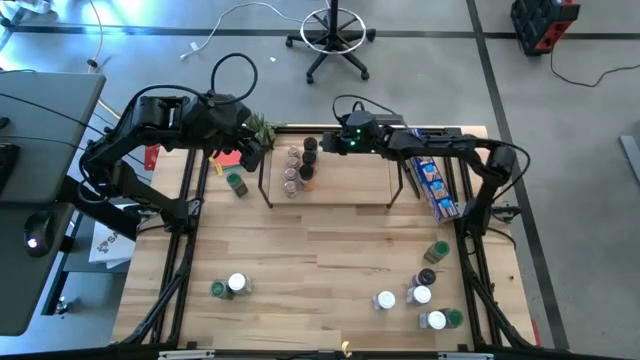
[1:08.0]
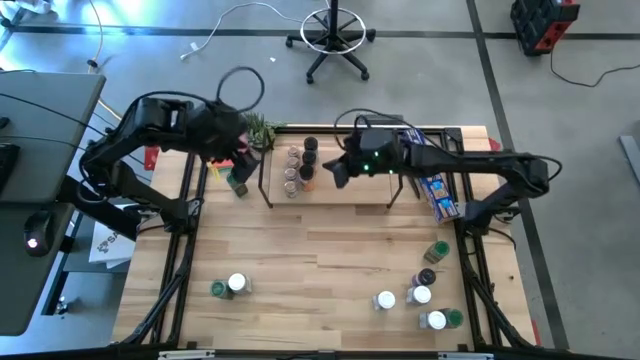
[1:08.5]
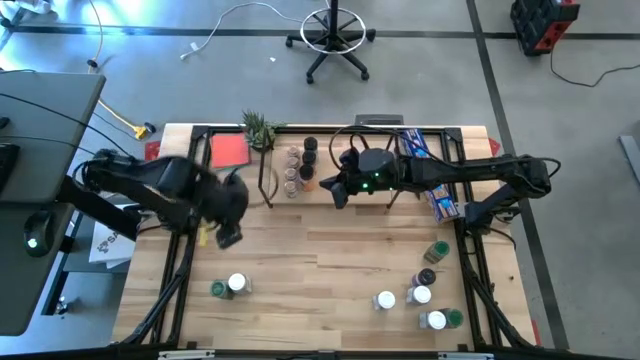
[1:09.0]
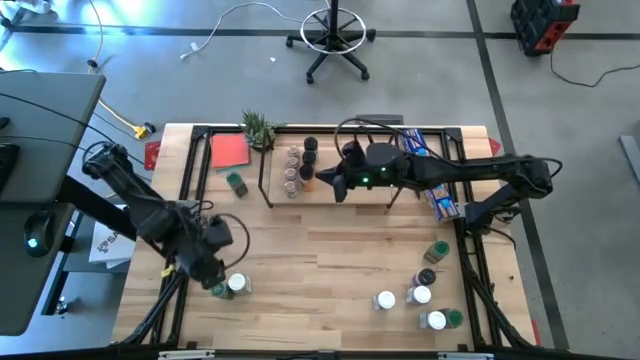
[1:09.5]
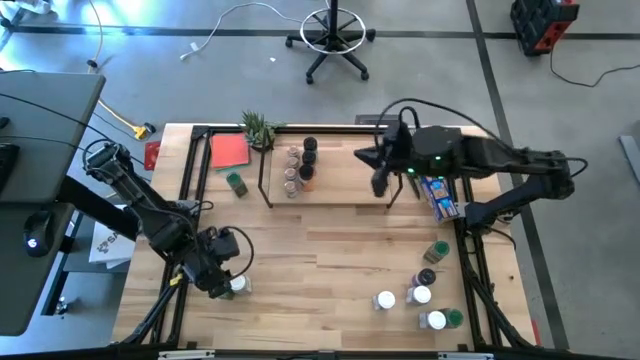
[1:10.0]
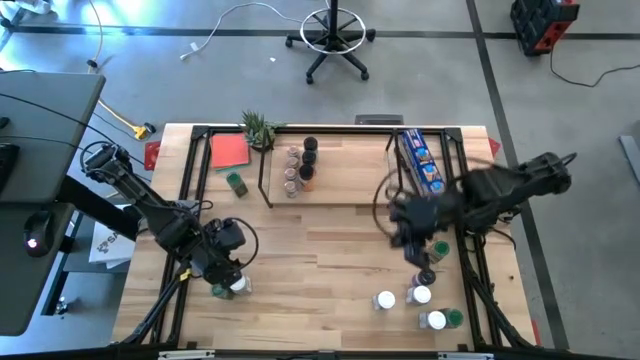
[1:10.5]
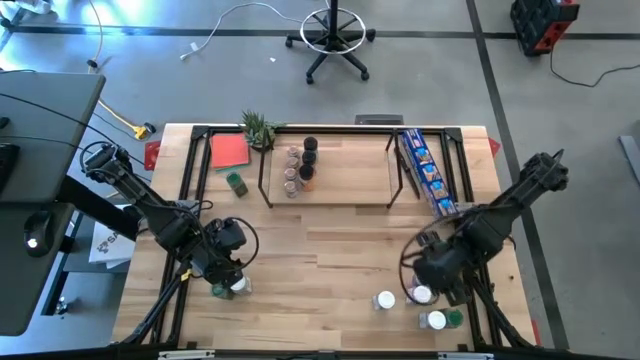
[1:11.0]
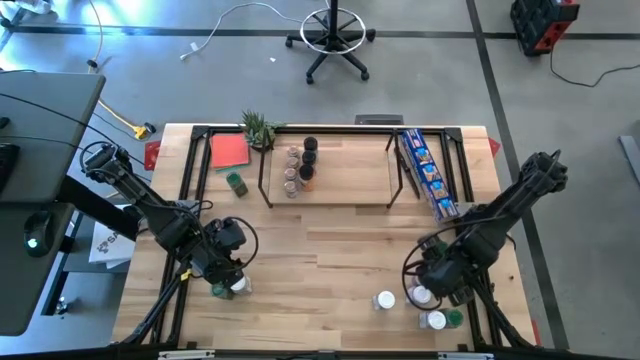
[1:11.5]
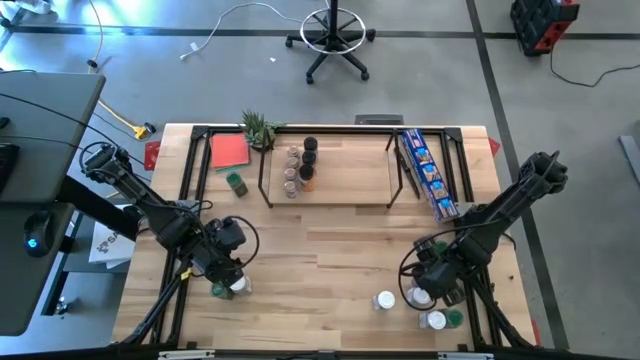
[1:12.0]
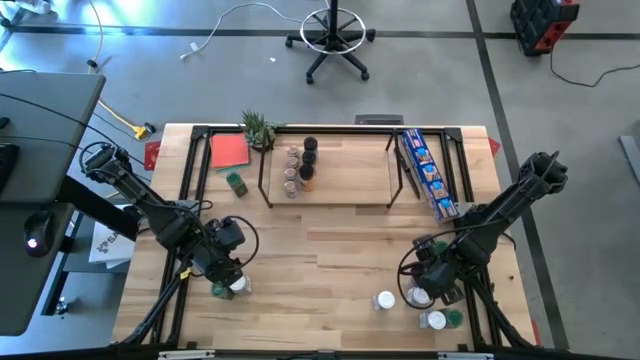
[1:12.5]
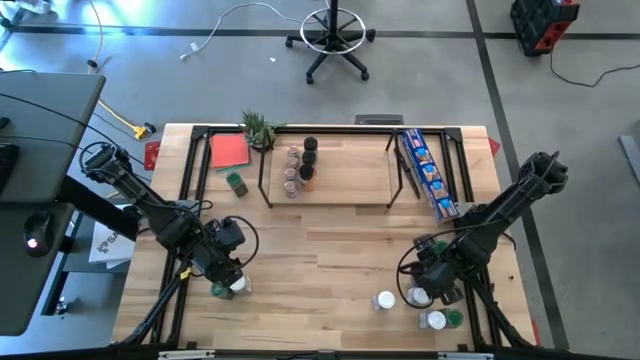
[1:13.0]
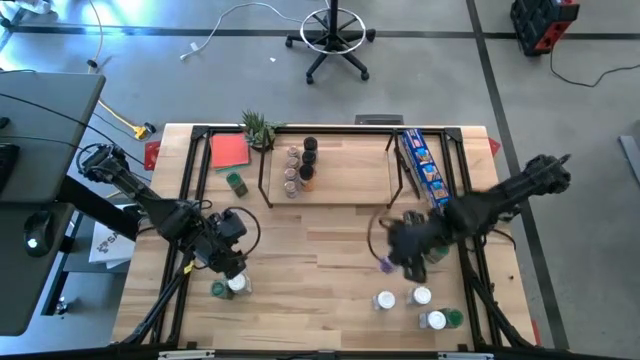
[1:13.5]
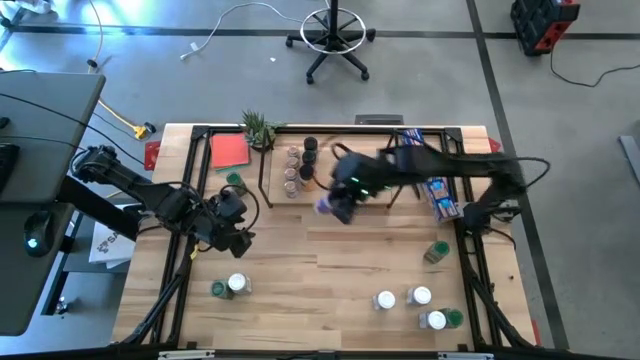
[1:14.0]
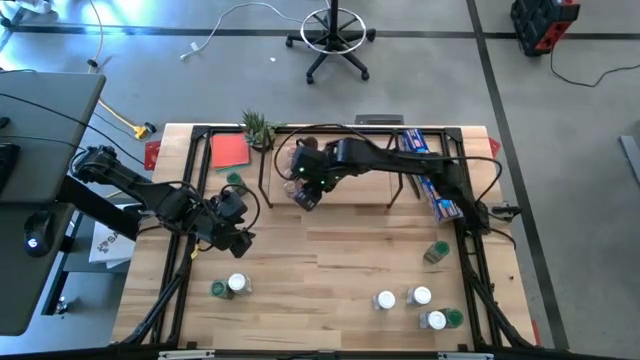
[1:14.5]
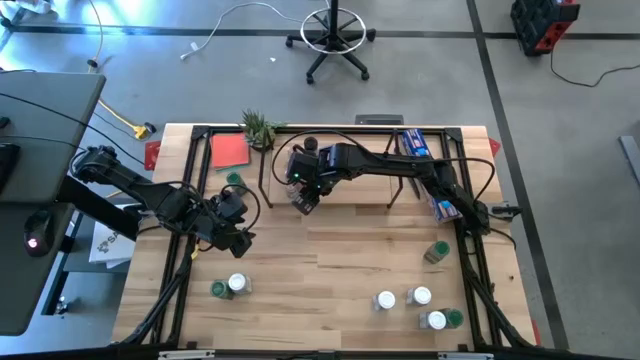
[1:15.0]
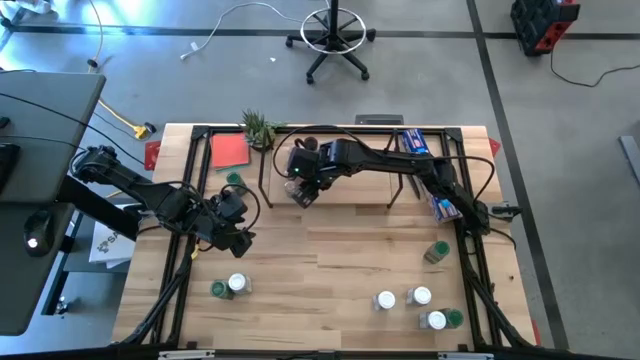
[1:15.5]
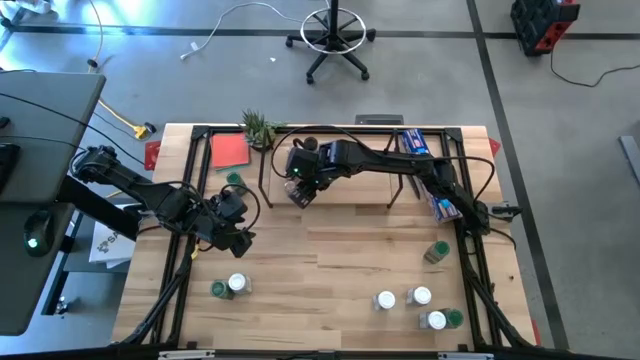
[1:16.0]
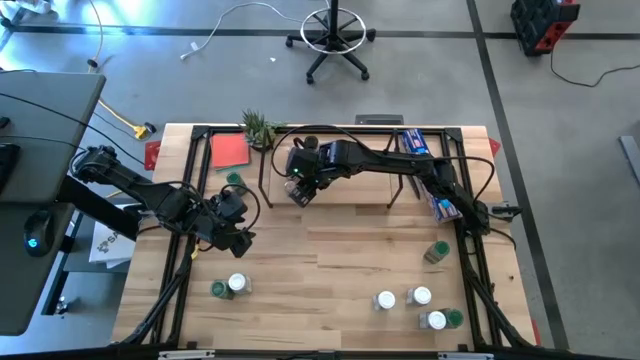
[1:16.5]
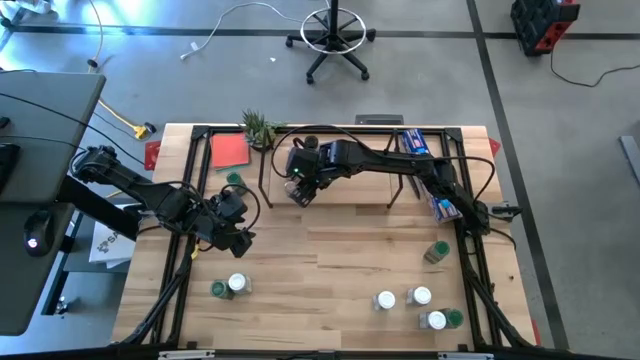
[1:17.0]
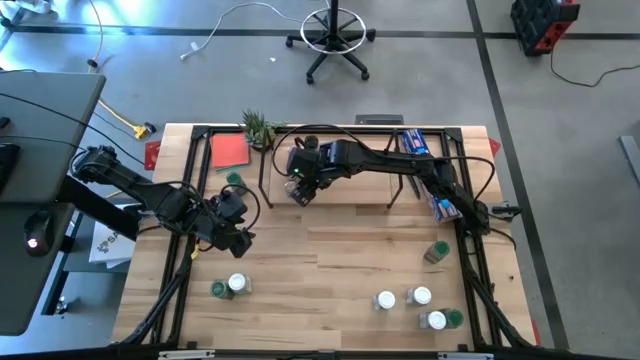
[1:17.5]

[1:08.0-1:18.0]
Task: Shelf spices
Put the black seasoning bottle aligned with the other black seasoning bottles on the shelf

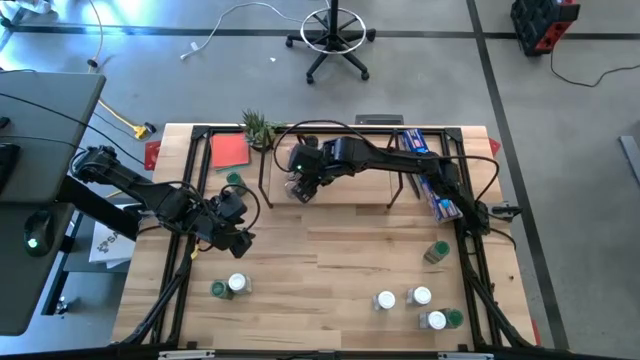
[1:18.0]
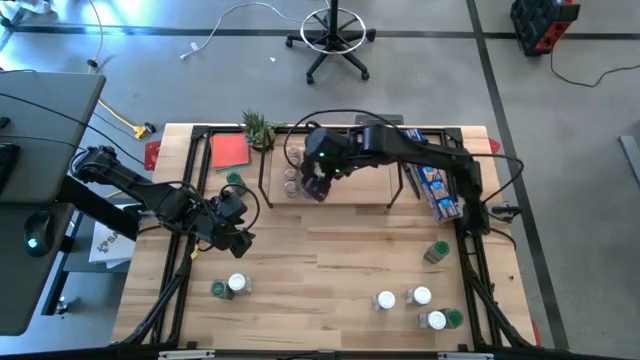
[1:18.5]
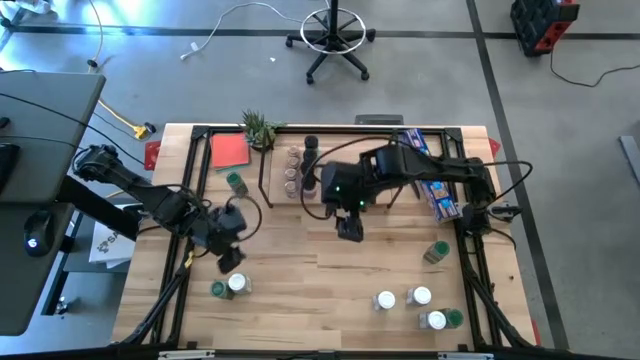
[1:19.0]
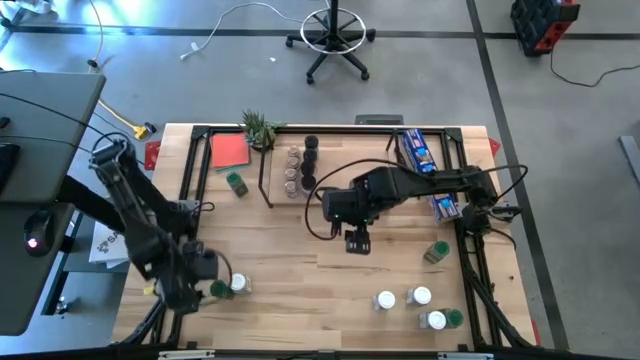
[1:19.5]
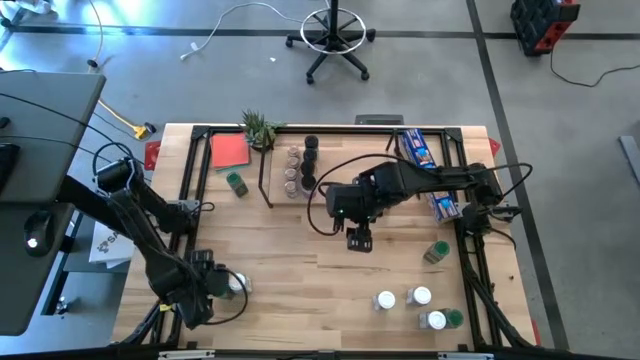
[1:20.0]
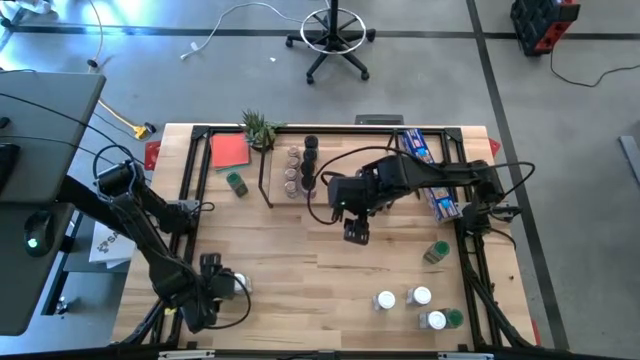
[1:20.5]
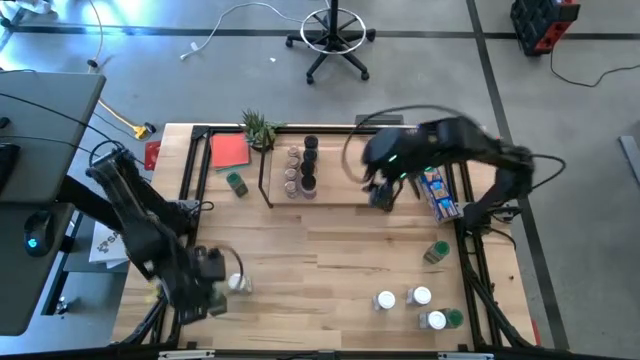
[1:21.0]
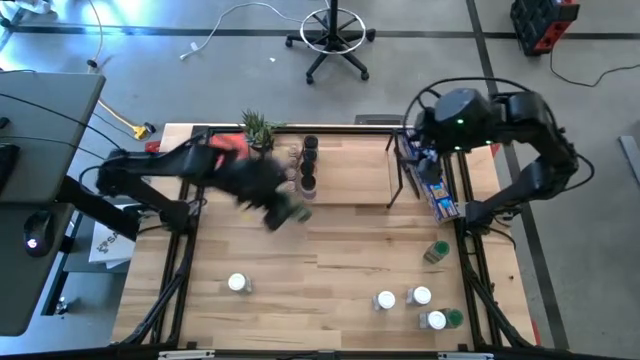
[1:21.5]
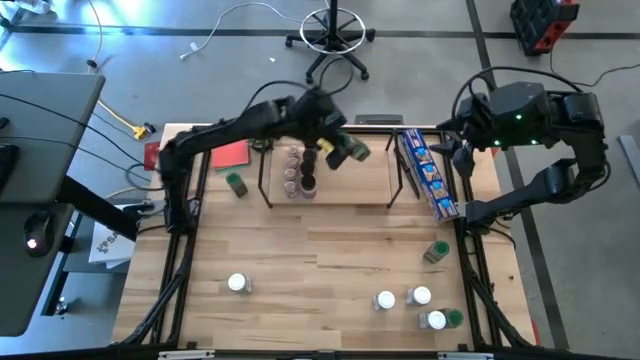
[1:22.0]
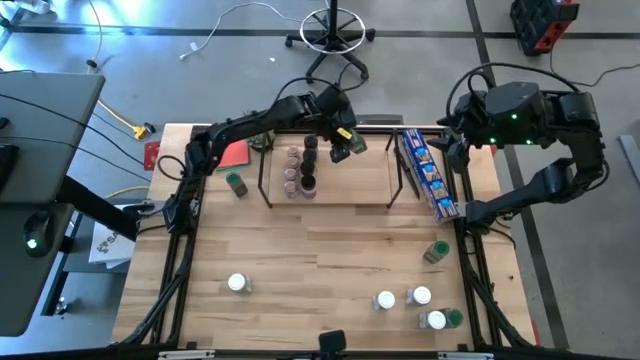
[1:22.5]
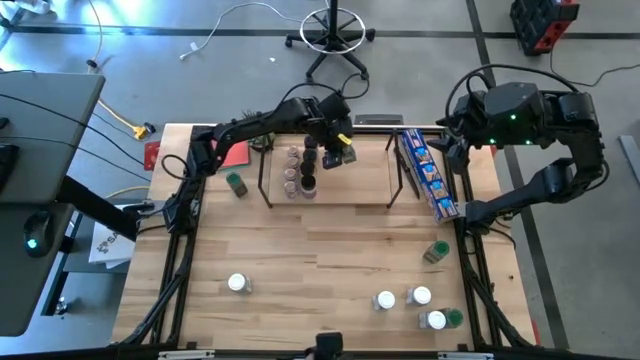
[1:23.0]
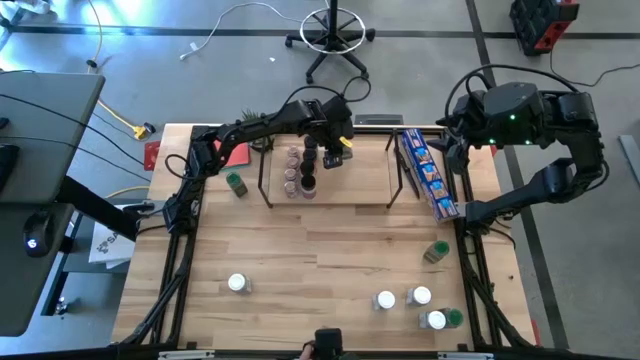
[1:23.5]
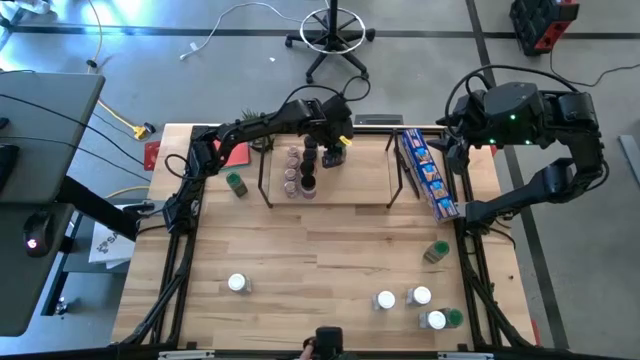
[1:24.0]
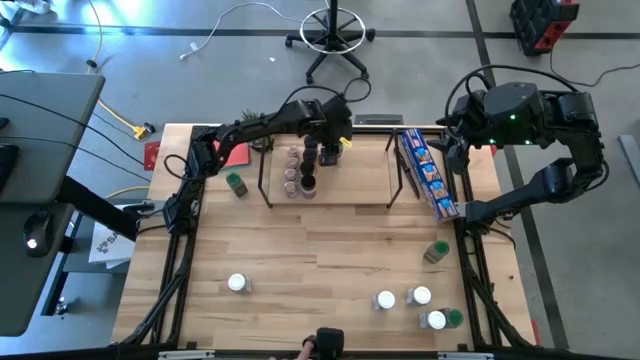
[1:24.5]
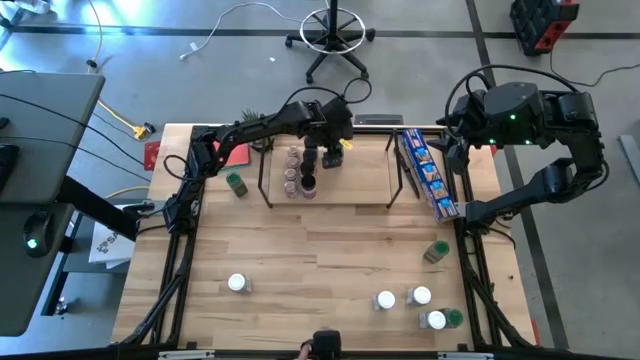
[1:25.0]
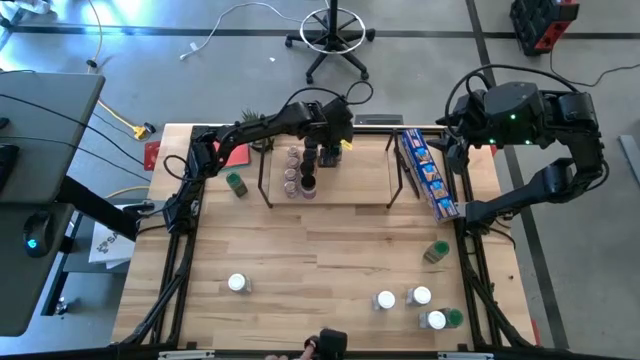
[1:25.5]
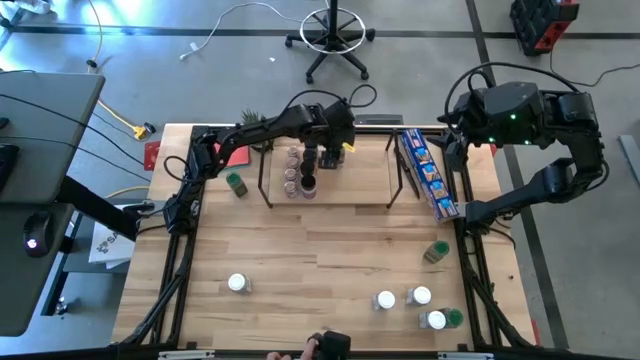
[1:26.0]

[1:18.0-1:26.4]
Put the green seasoning bottle on the shelf

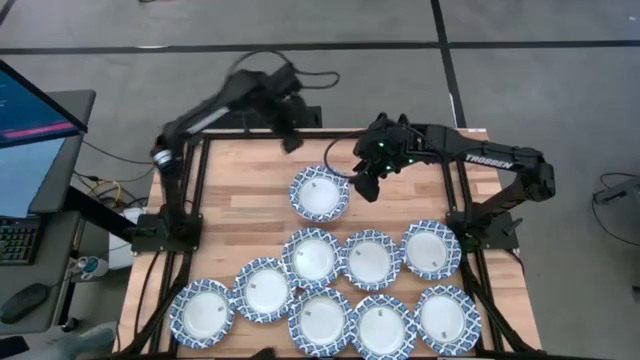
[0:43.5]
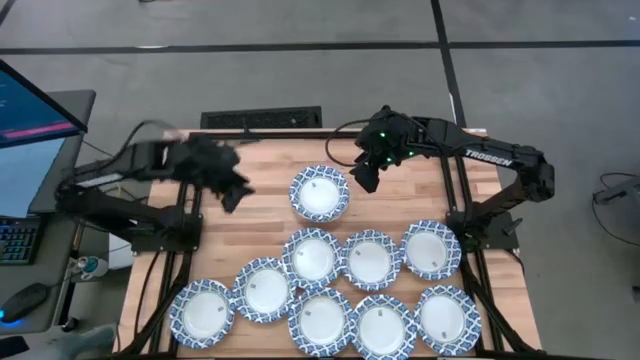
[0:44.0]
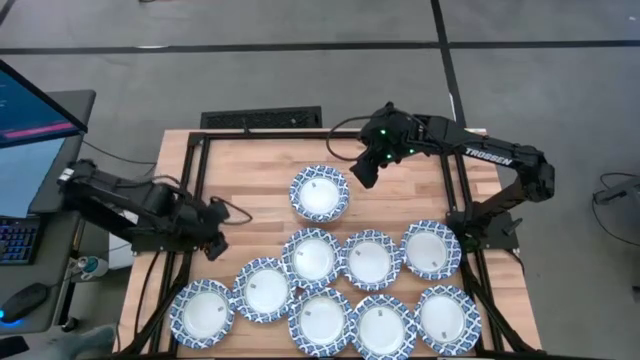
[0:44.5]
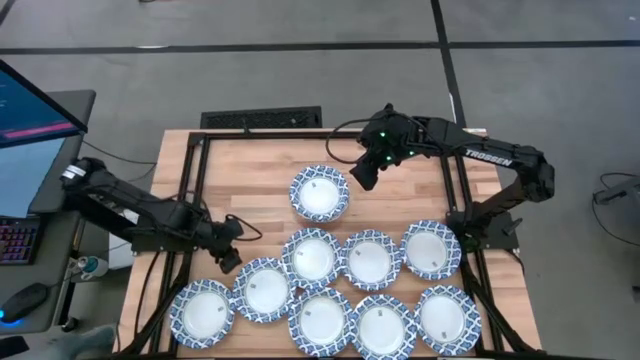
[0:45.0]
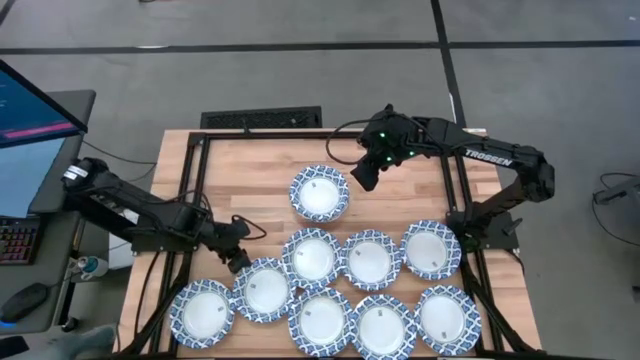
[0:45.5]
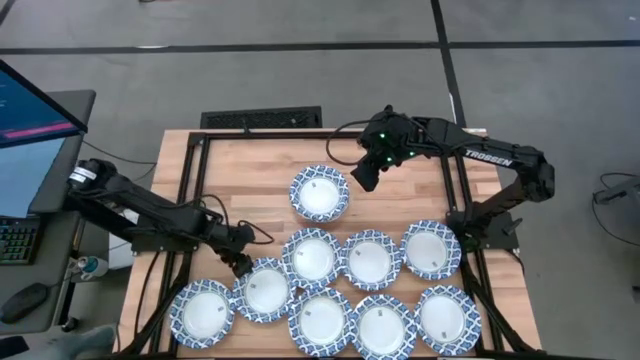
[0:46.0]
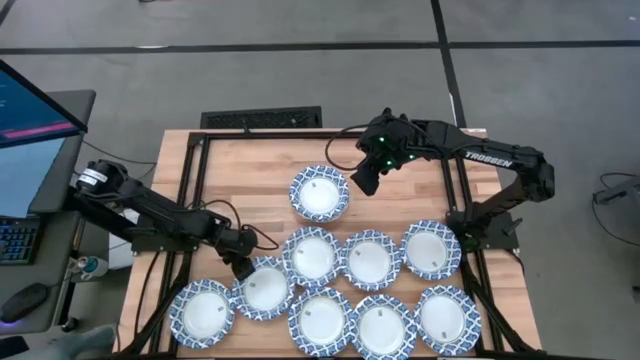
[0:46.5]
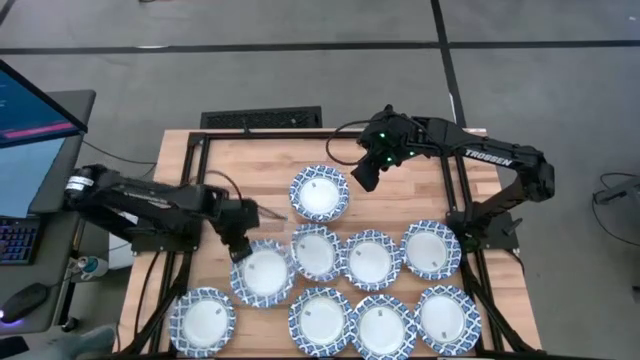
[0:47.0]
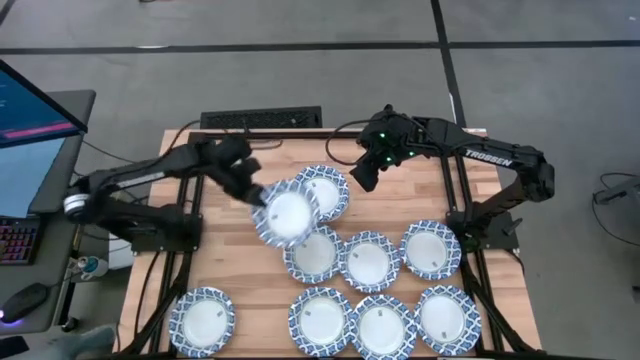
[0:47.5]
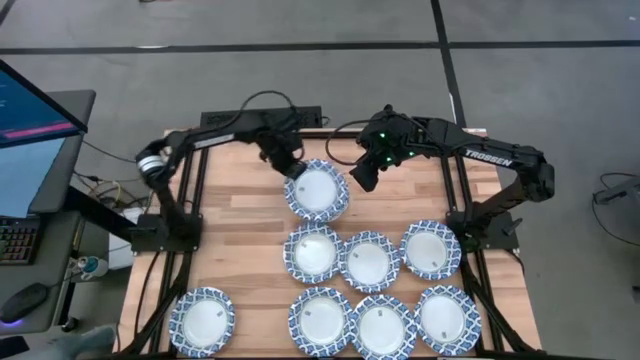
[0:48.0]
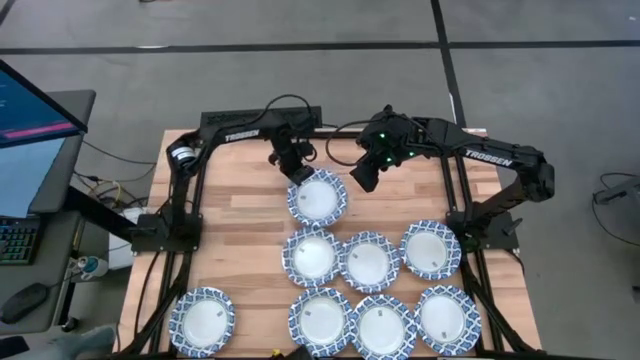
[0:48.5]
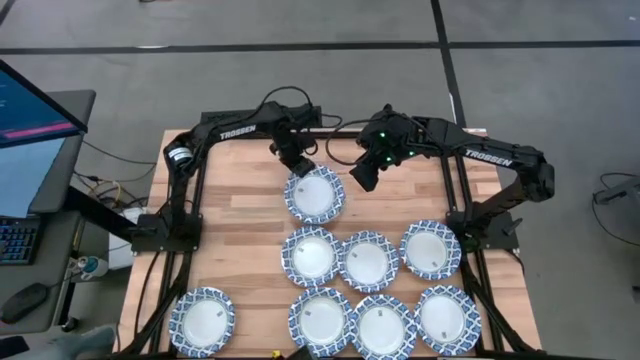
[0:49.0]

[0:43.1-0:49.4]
Task: Nest bowls inside each other
Stack the white bowl on the stacked white bowls
